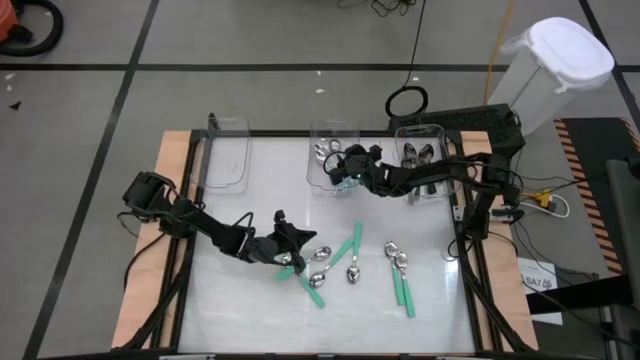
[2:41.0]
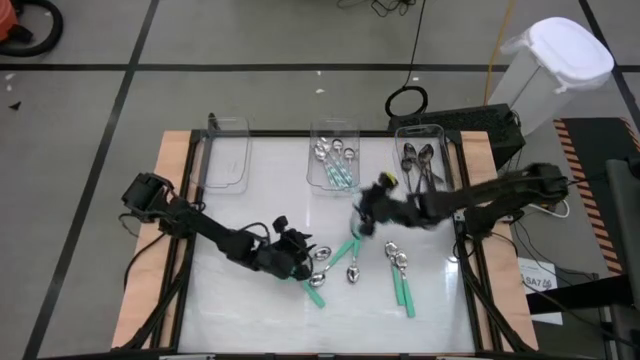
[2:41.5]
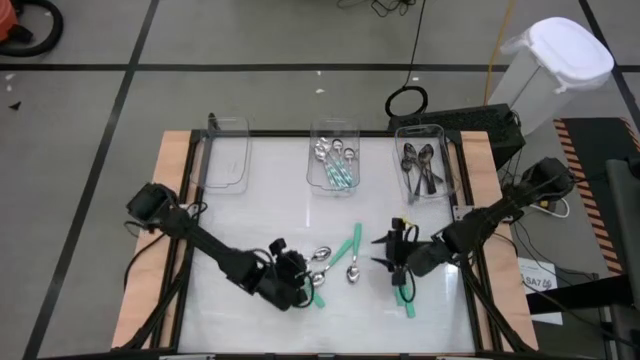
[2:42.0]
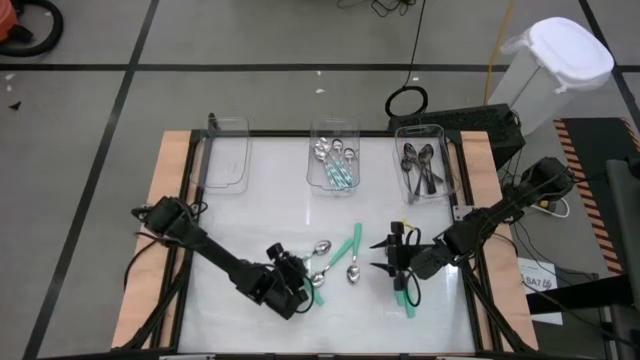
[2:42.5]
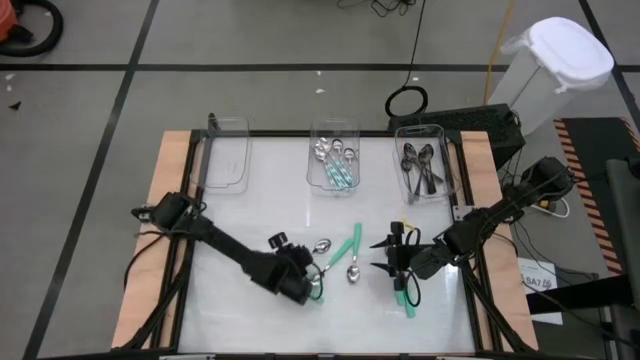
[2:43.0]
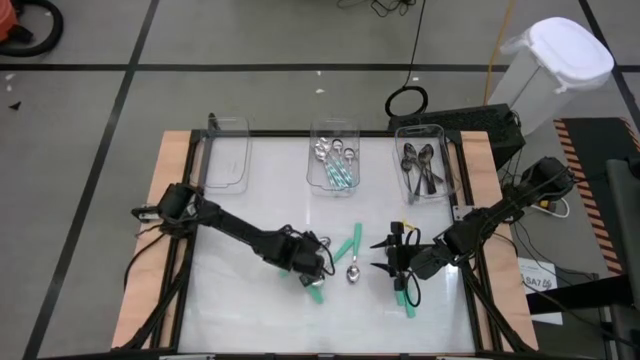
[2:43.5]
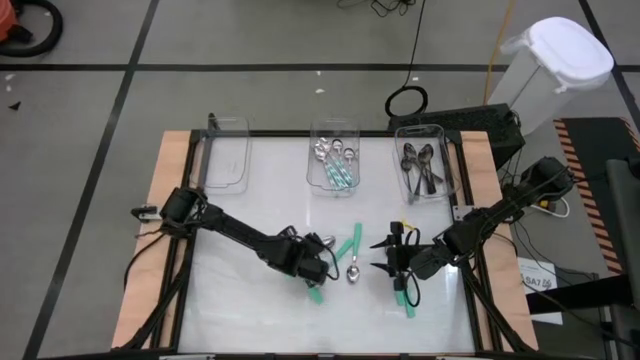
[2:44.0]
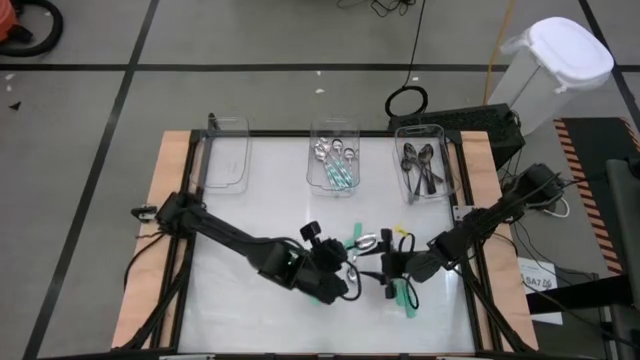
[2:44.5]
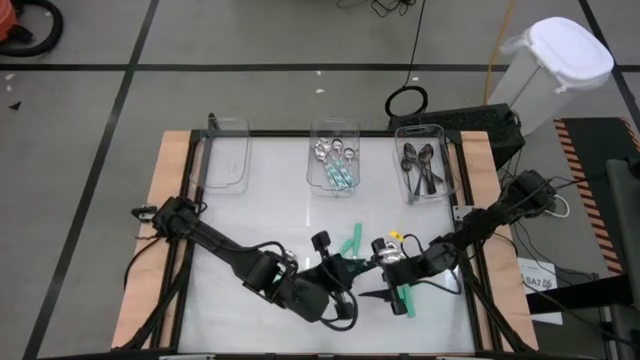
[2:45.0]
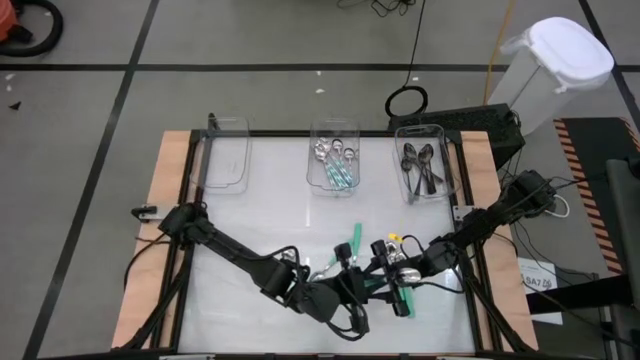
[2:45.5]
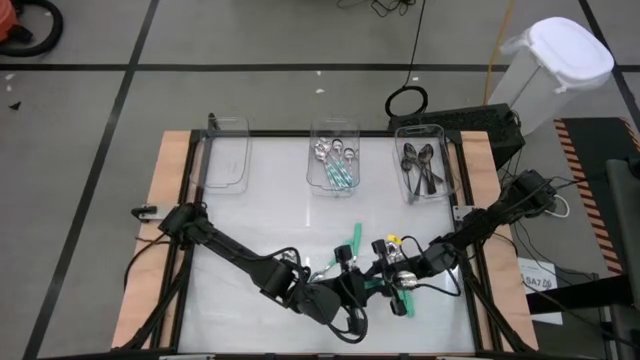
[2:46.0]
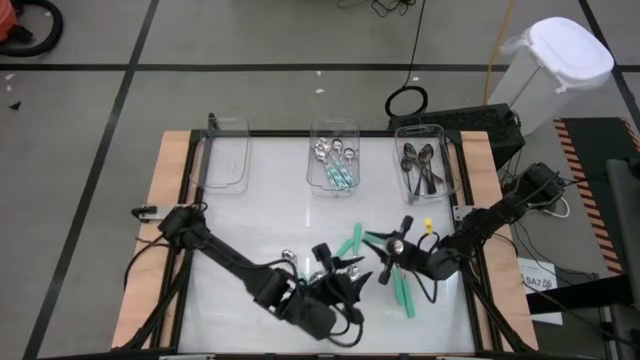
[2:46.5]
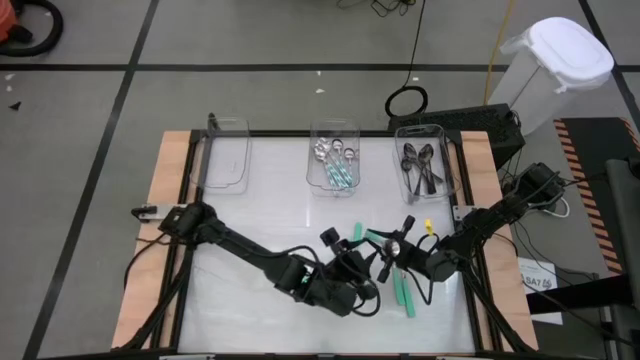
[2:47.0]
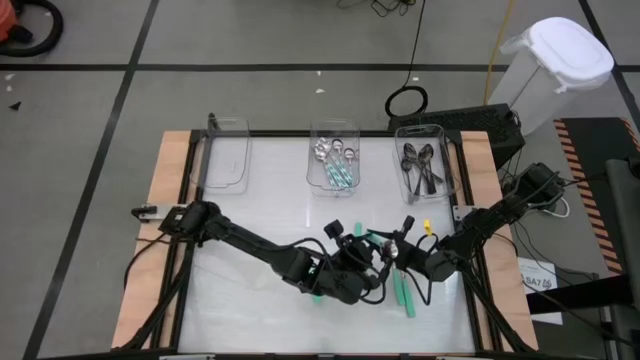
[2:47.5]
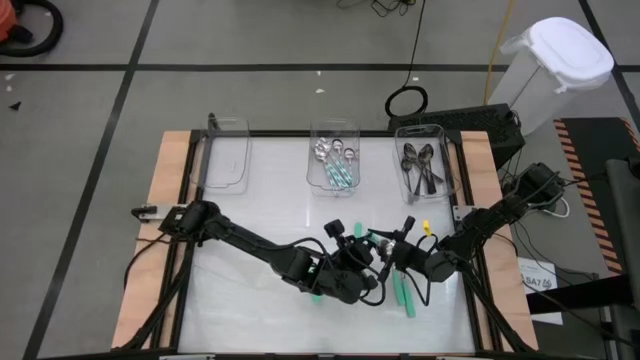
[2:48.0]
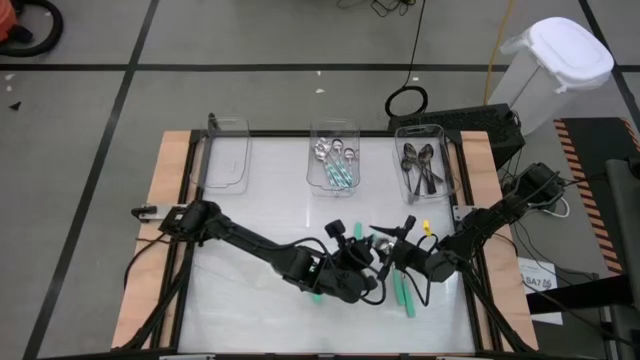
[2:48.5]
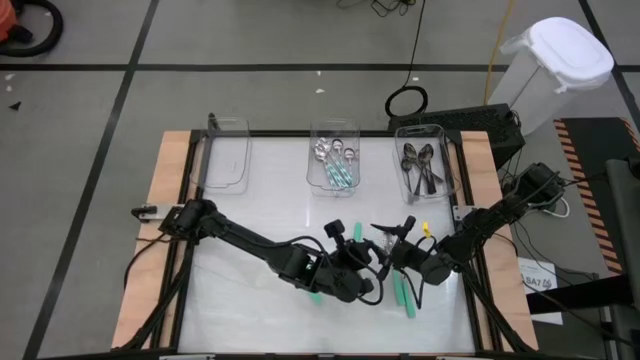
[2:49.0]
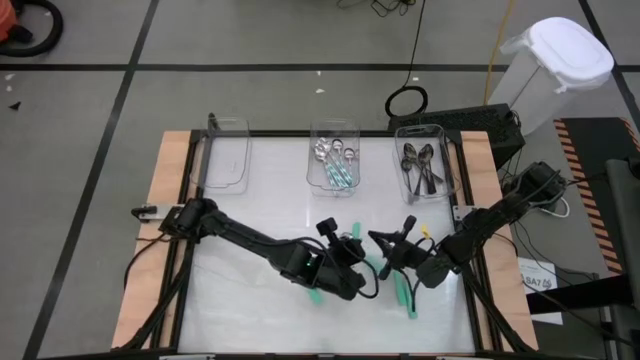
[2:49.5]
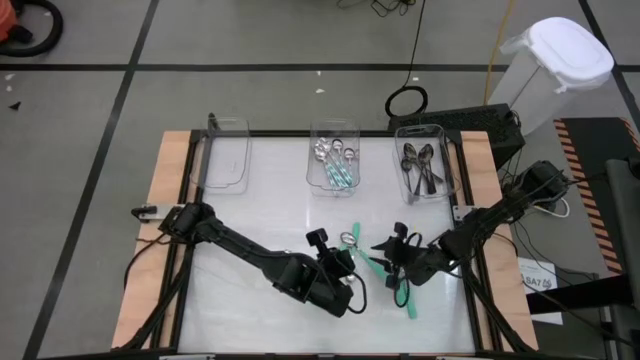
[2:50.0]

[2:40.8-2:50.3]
Task: Sort silverware by color (type)
Put the green spoon into the left transparent bin

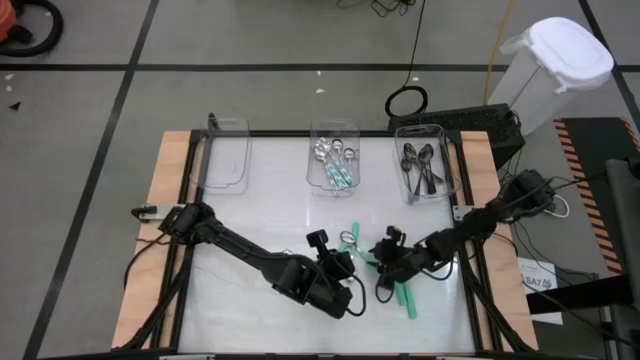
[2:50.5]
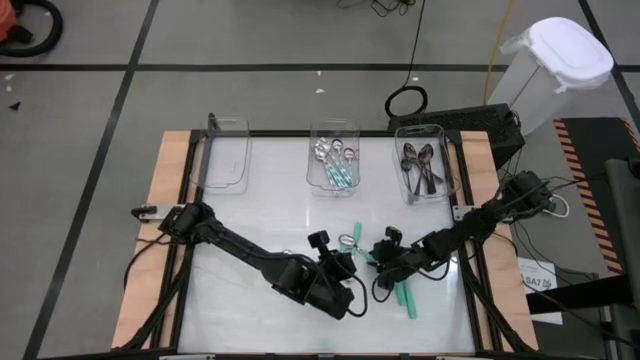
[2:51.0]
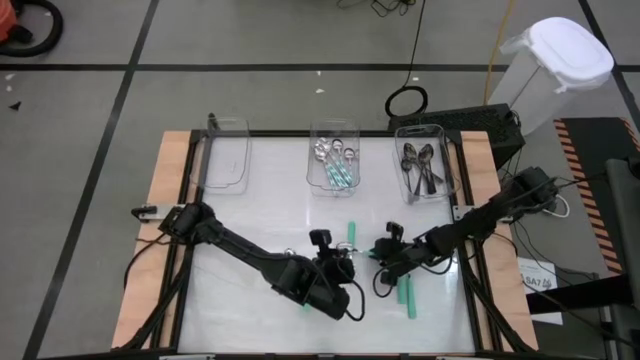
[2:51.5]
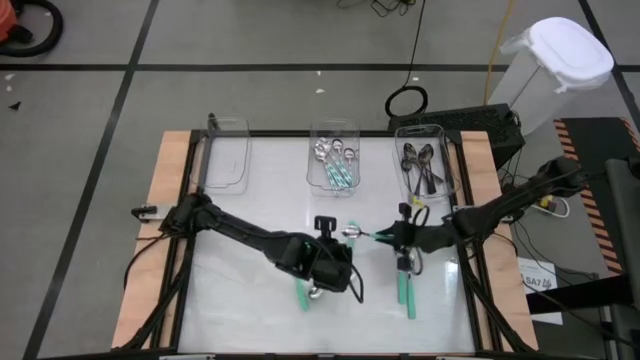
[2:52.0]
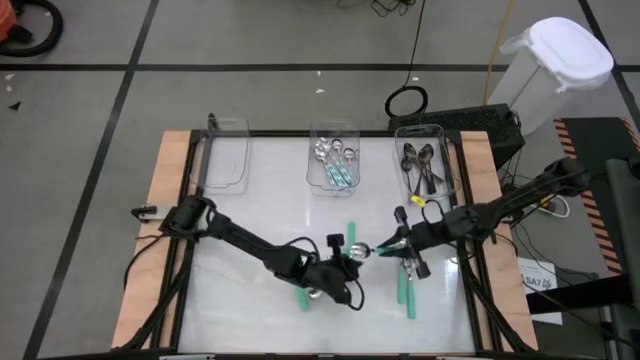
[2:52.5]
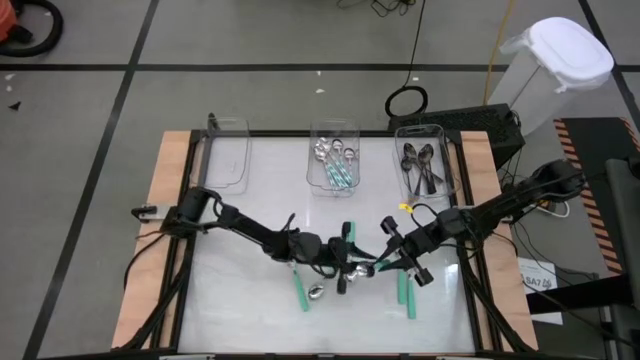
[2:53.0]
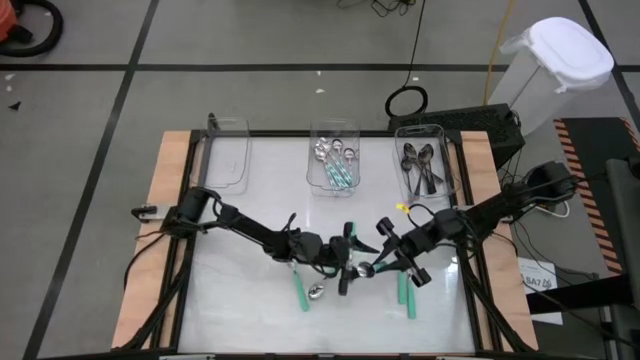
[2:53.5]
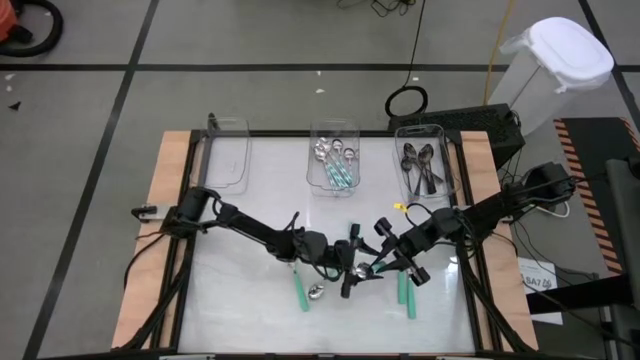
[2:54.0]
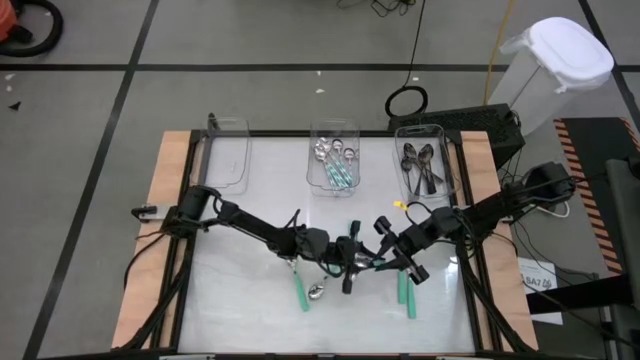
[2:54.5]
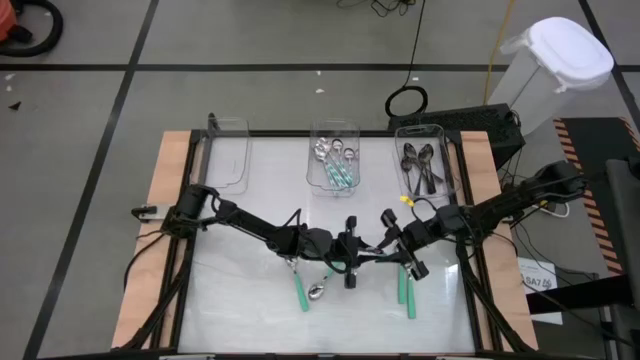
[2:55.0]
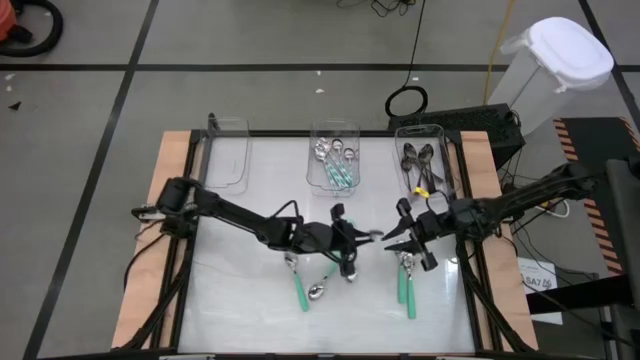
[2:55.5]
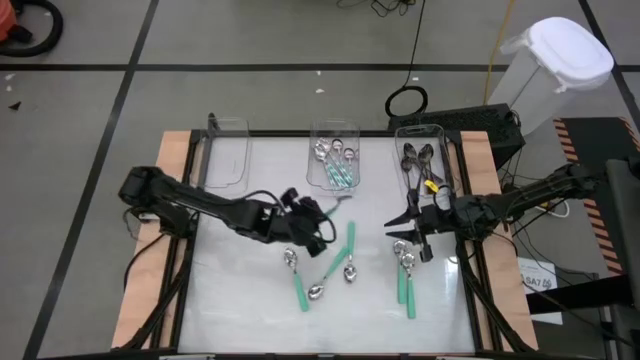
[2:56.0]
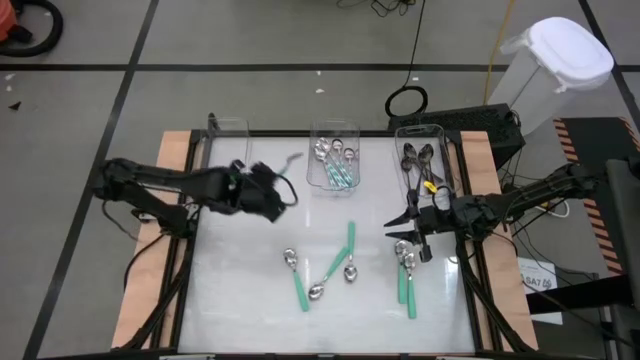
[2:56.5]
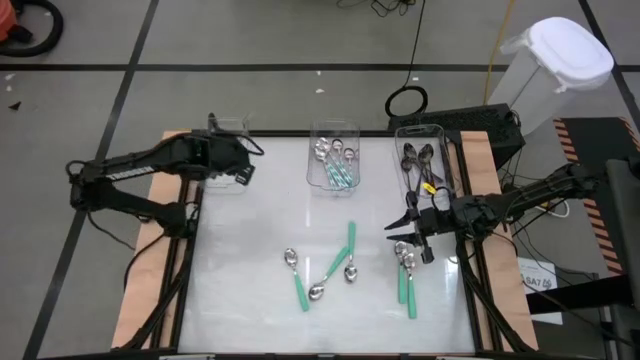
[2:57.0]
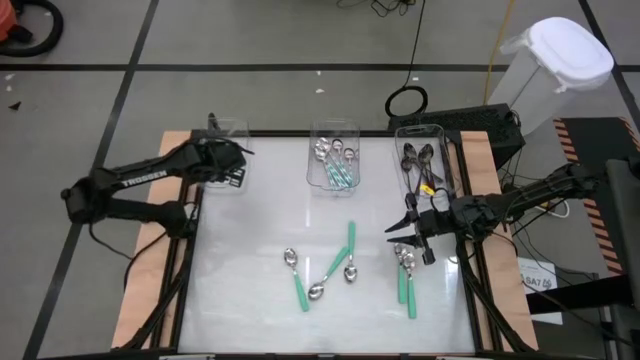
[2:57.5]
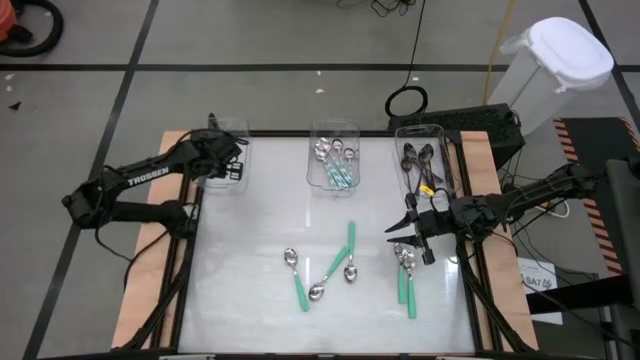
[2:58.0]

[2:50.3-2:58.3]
Put the green spoon into the left transparent bin

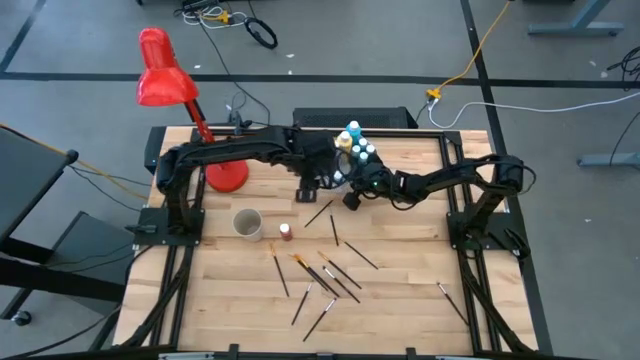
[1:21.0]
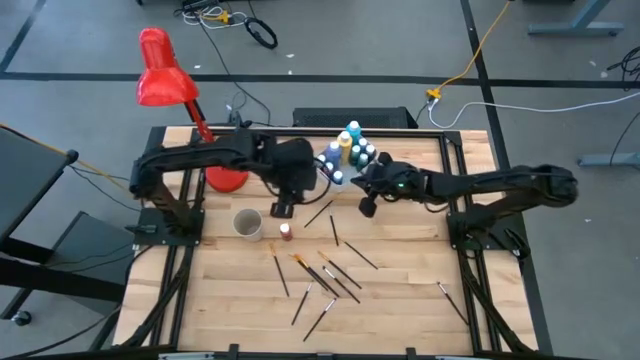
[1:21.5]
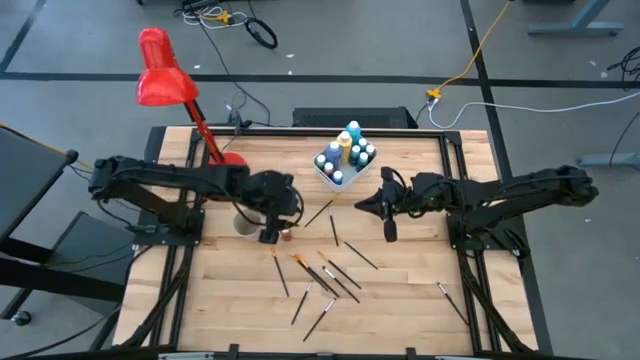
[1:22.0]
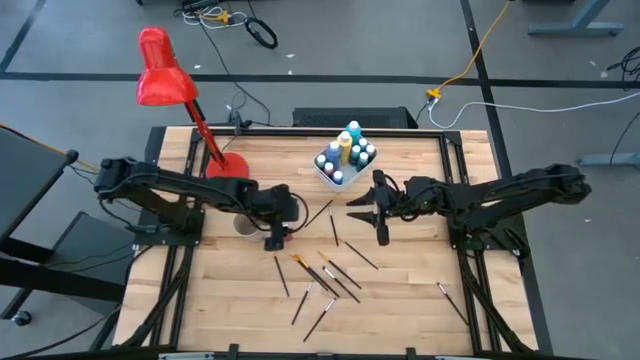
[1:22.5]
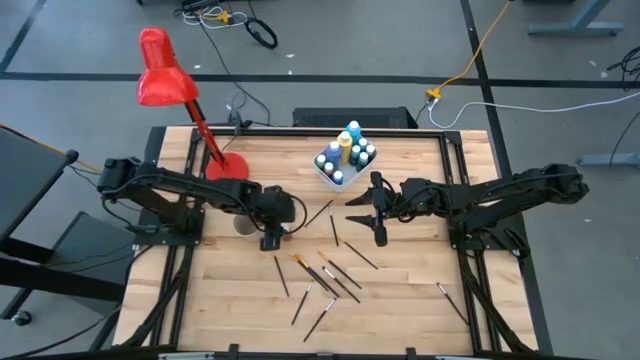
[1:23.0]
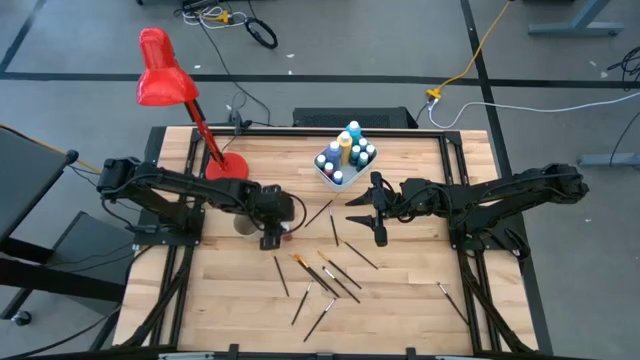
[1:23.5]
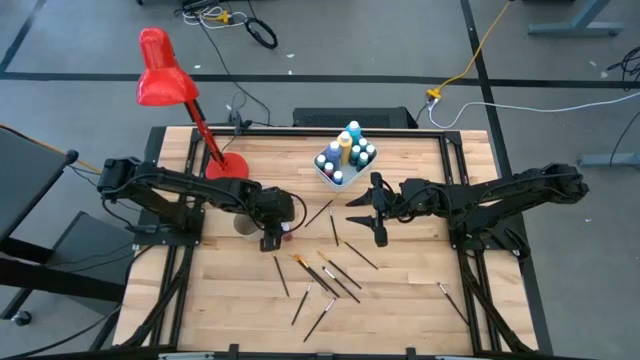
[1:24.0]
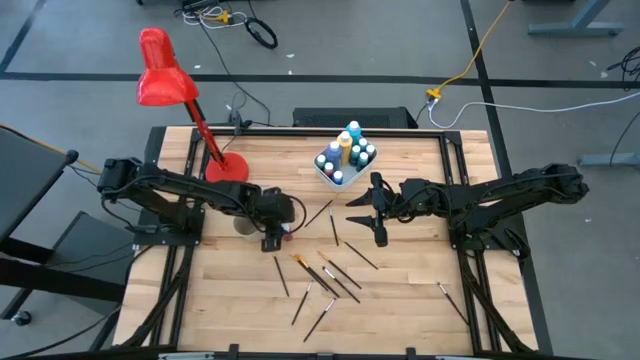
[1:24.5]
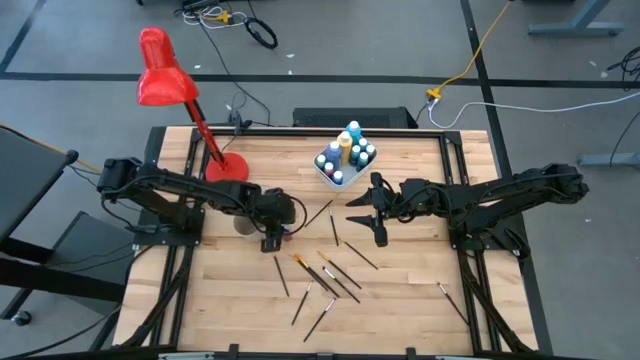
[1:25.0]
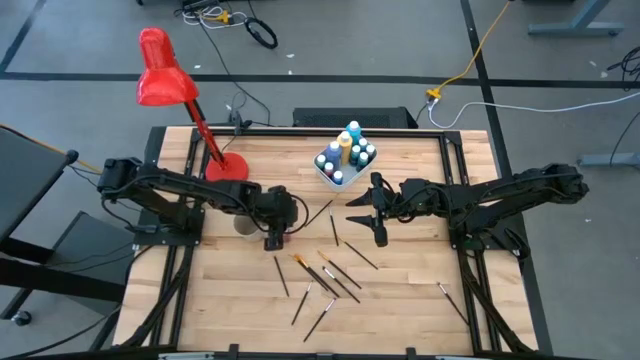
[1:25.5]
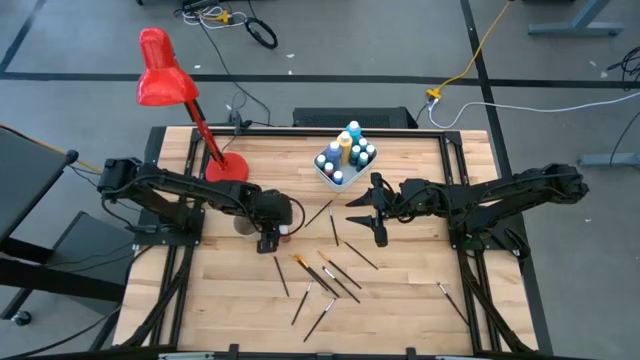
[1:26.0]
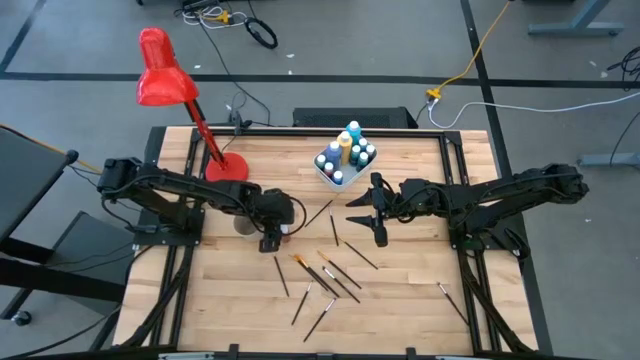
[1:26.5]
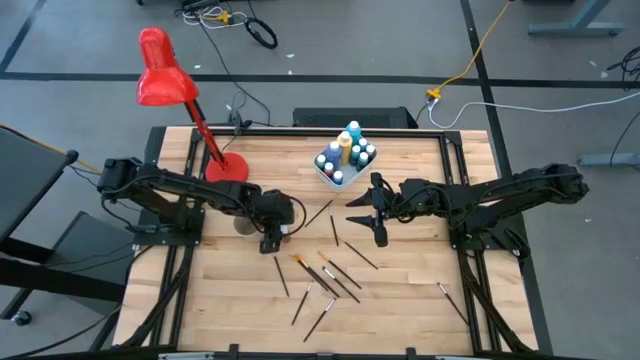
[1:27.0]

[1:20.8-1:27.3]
Task: Pick & Place Paint Supplies
Put the small orange paint bottle into the white bin
